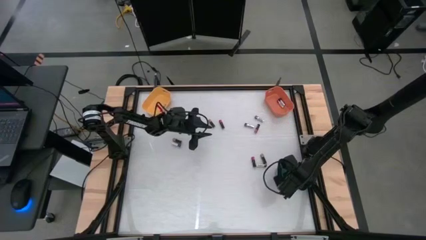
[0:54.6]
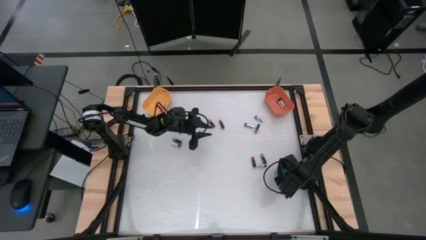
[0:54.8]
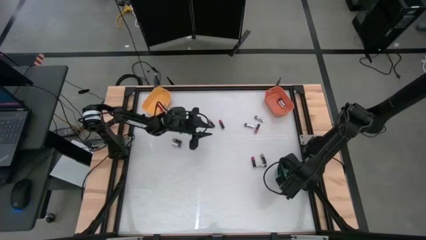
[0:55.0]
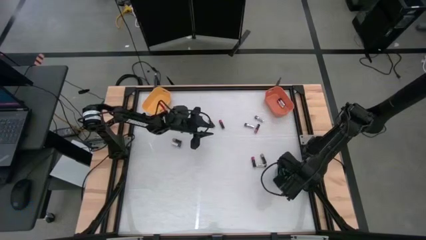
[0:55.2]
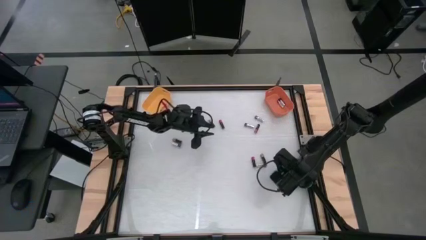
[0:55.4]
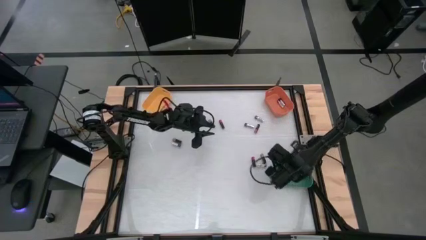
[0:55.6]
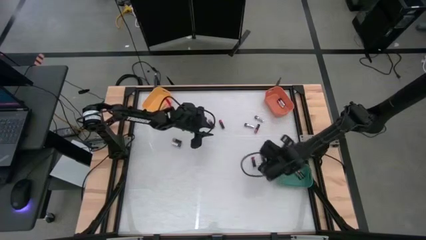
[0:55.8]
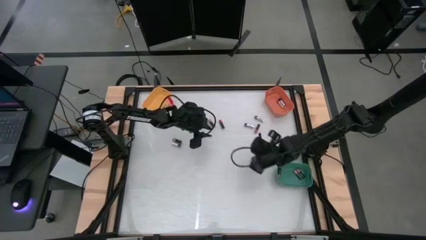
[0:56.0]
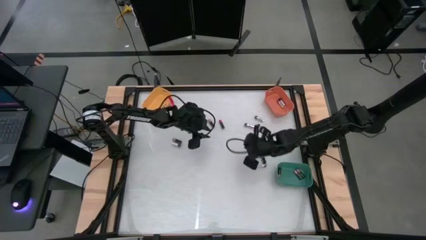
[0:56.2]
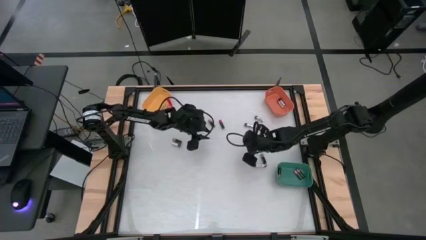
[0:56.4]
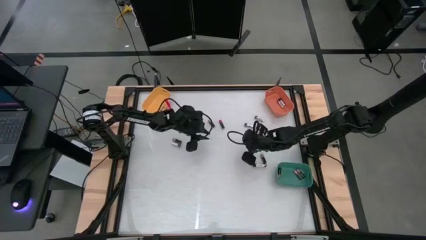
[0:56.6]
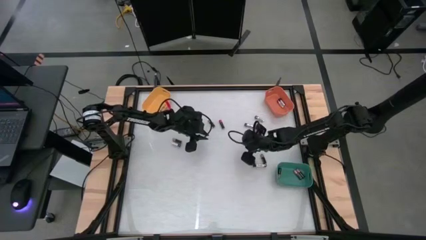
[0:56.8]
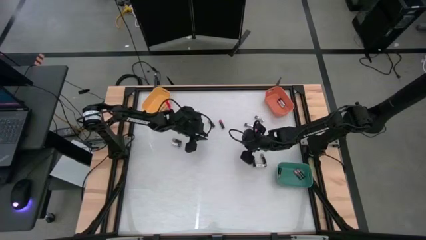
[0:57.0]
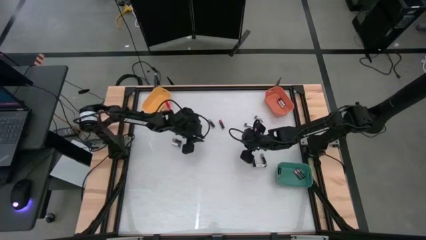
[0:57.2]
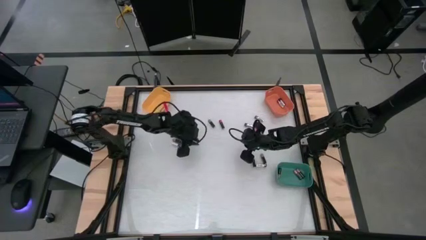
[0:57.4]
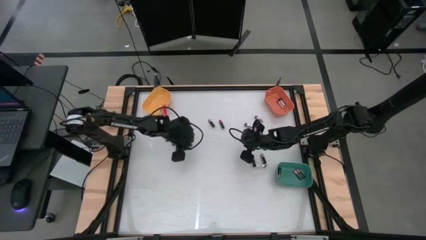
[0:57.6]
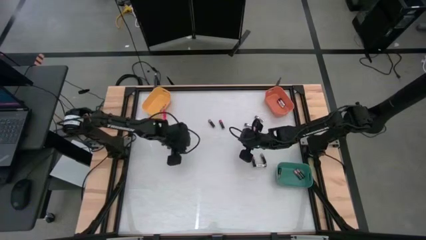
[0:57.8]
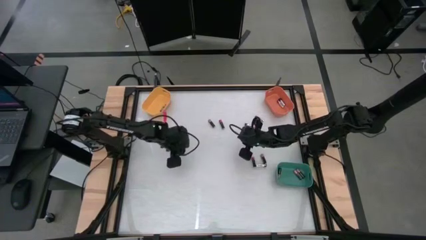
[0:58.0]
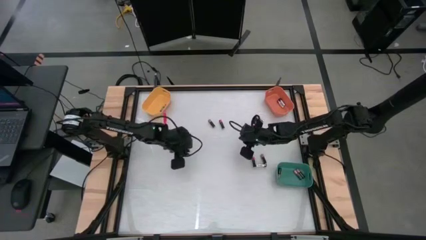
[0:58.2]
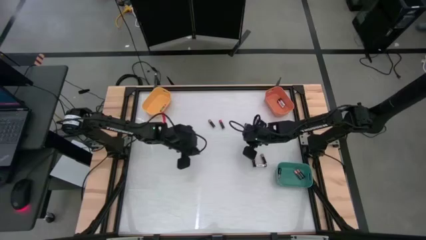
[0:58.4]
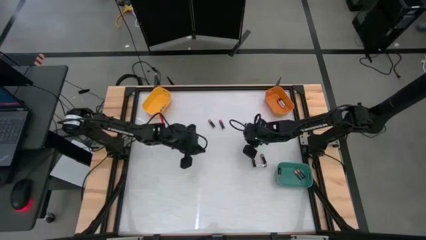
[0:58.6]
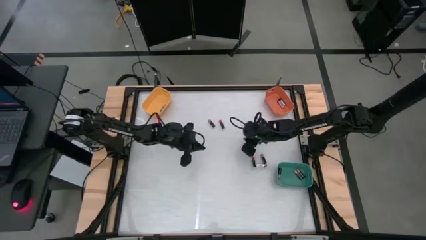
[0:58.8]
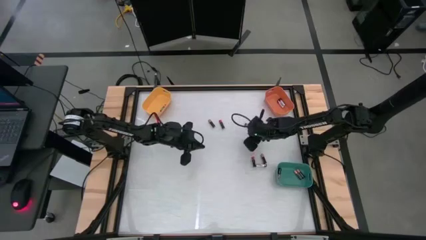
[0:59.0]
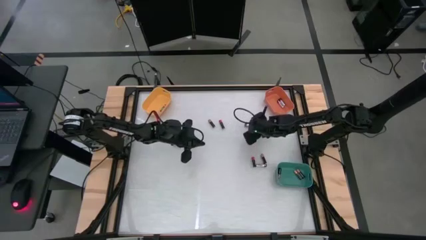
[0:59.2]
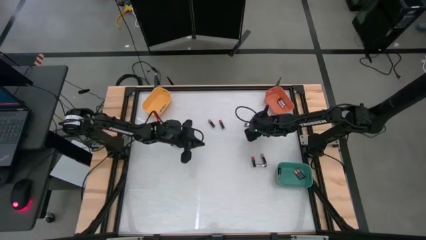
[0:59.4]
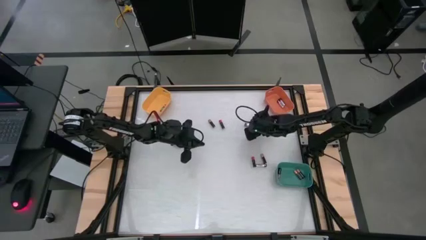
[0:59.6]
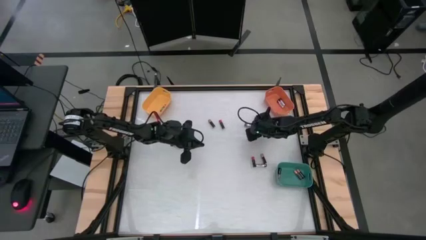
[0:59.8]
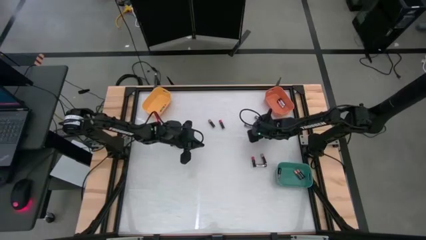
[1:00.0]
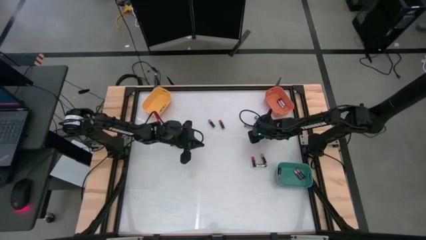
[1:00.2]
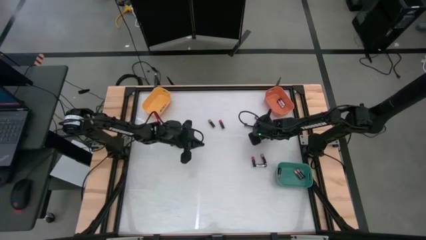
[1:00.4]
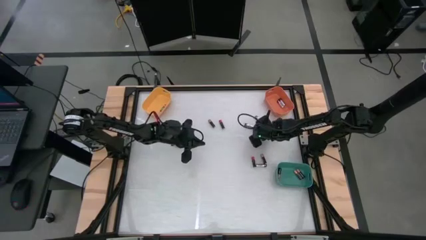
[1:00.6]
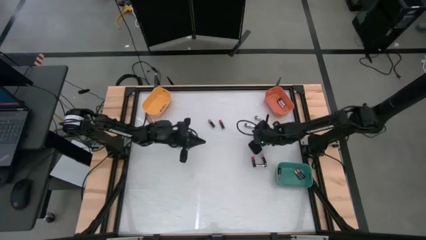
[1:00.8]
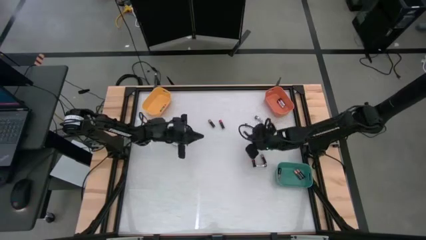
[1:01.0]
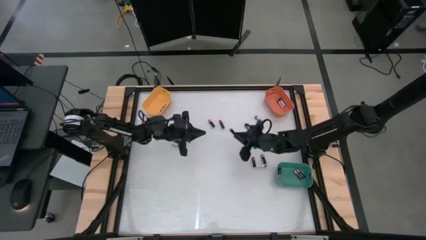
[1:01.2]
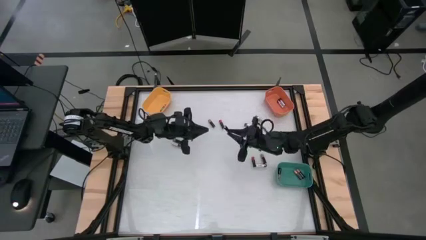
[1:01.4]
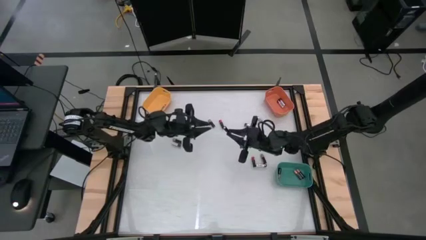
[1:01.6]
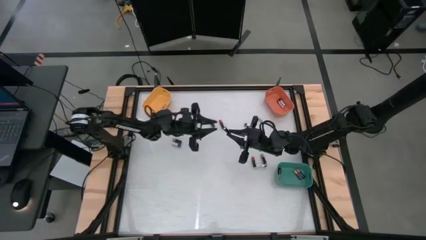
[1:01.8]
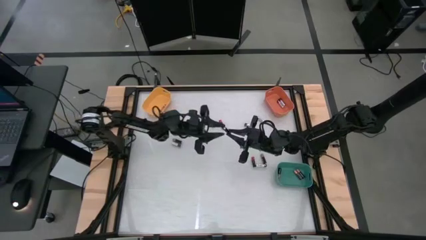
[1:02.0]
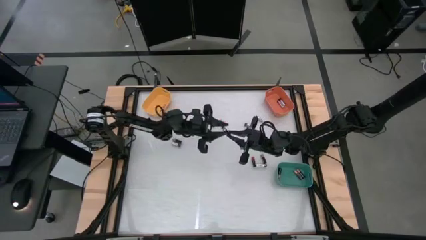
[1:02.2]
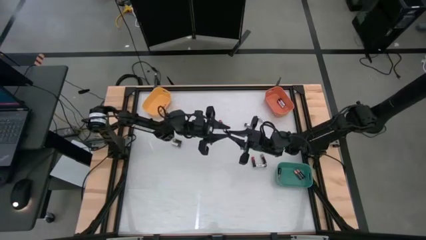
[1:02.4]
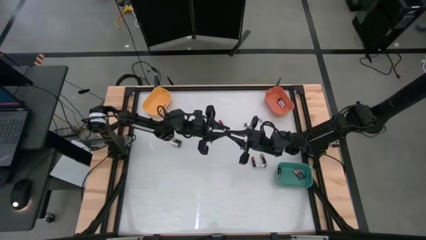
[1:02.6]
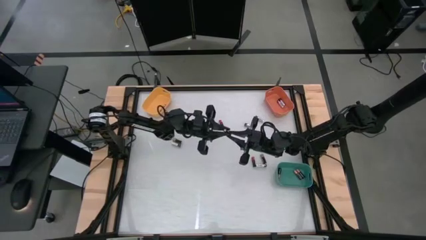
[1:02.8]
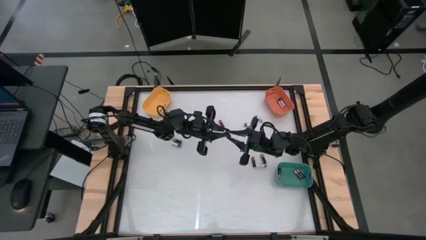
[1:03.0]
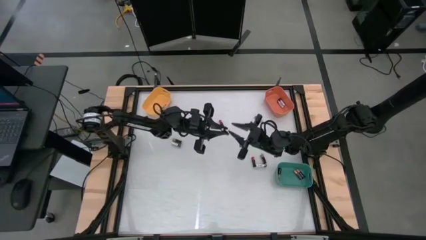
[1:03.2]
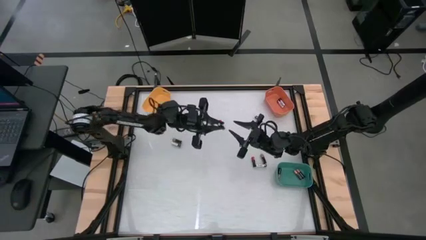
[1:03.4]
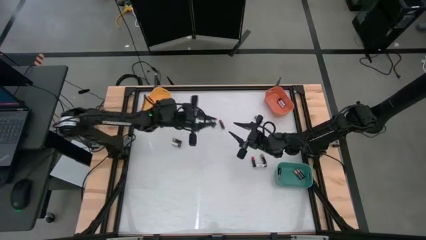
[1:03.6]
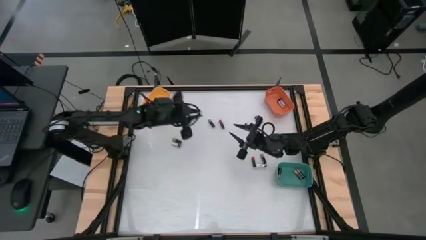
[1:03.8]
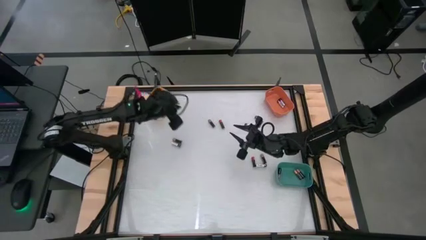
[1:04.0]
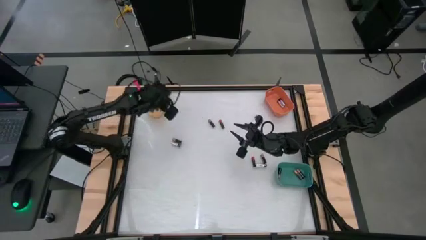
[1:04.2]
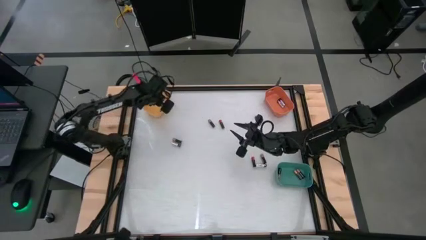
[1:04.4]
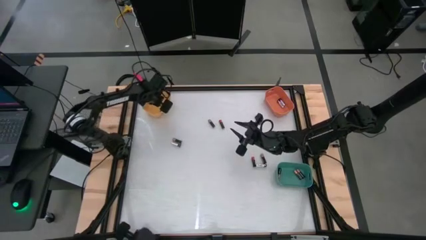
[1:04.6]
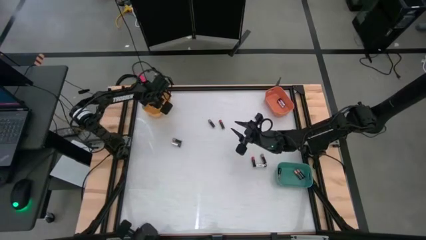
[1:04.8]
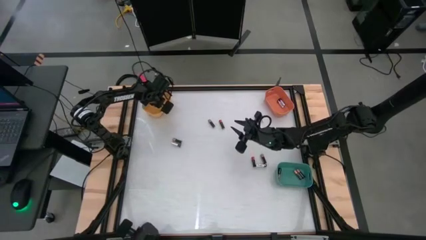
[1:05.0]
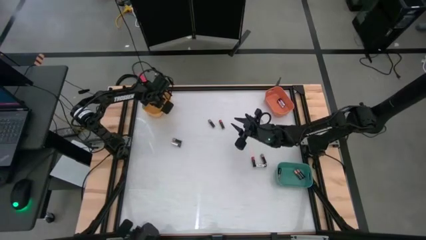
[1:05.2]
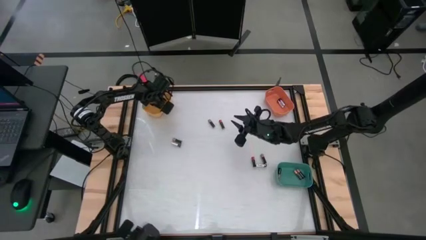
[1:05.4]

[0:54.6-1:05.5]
Task: Sort batteries
Put the red battery into the yellow bin

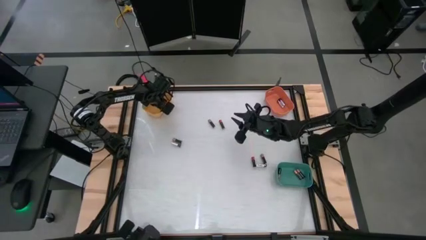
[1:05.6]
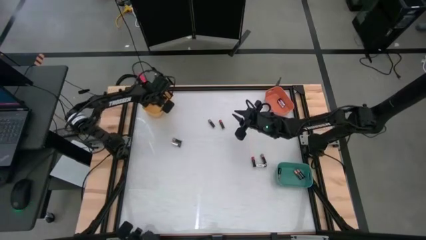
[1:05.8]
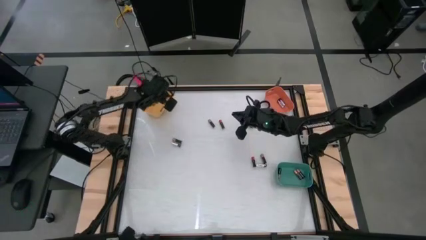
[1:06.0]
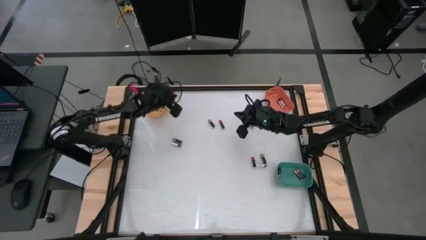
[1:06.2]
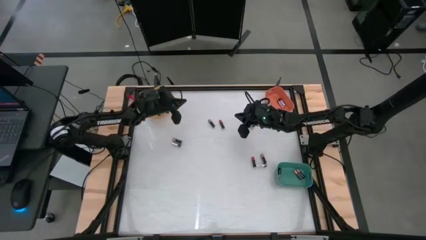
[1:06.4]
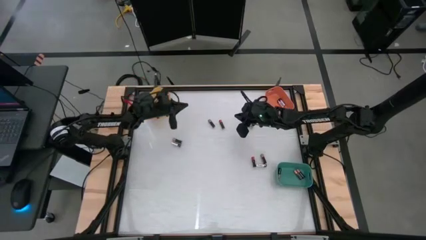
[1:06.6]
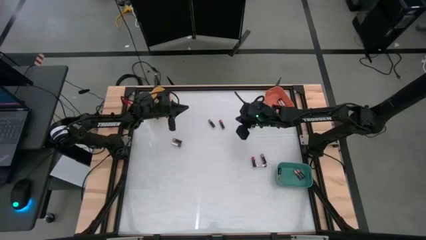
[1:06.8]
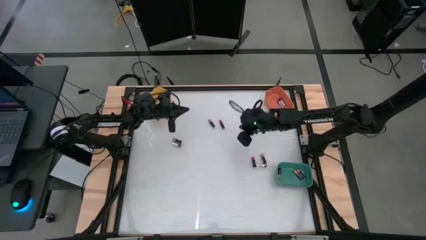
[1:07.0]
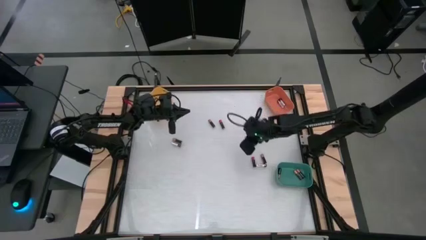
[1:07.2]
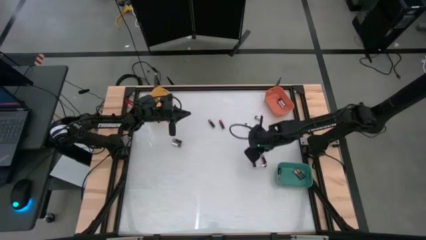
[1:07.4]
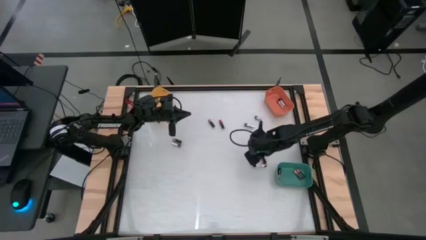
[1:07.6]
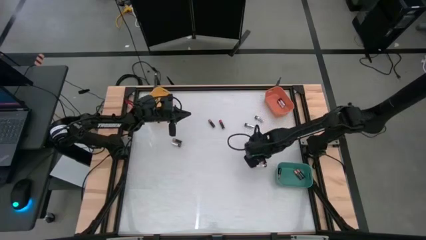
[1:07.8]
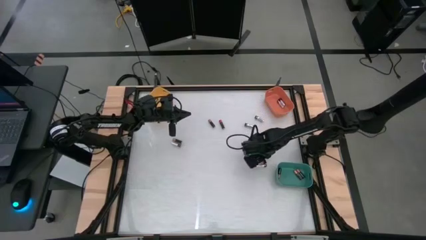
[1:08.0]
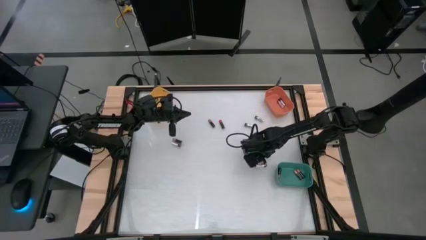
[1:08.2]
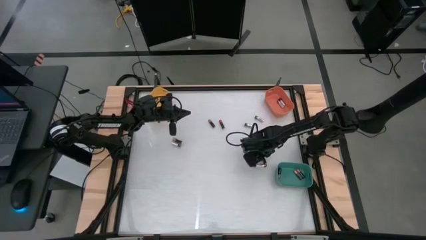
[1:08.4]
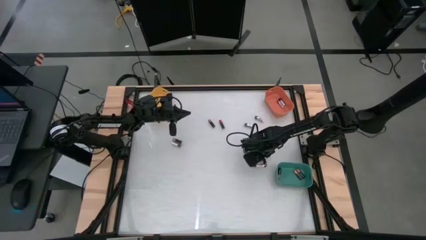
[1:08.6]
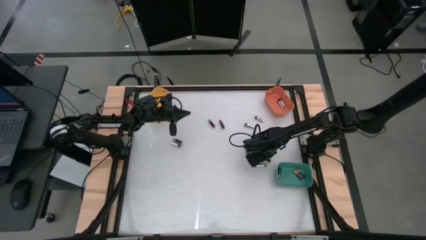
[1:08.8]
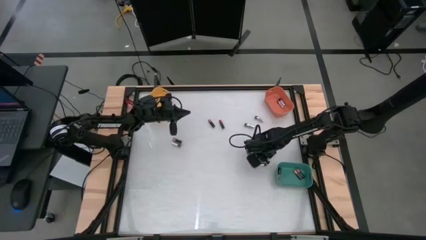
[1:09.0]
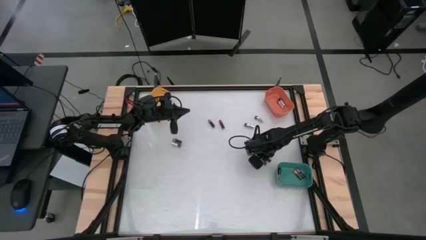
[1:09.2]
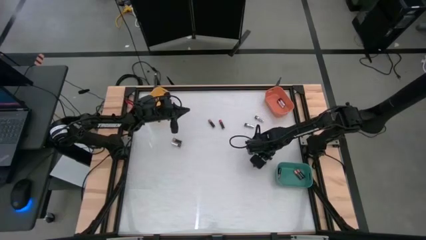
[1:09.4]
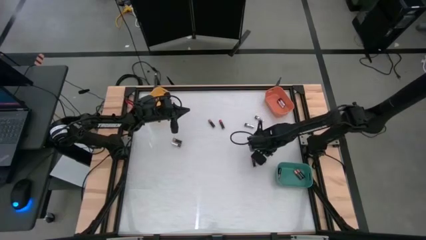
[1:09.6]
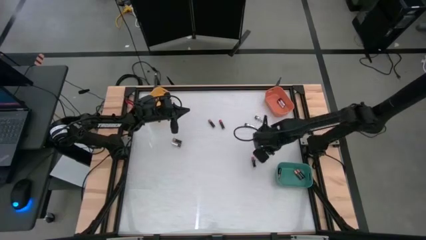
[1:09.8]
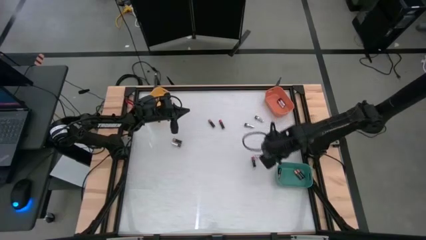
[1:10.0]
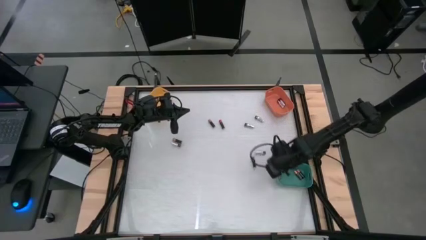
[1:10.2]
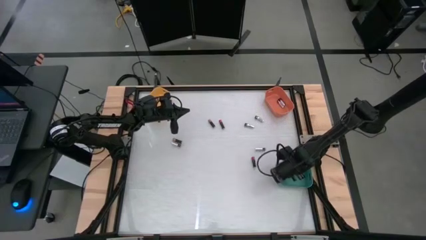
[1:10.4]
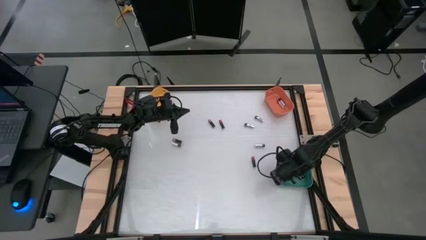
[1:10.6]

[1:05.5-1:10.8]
Put the brown battery into the green bin

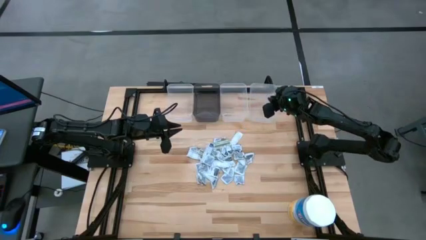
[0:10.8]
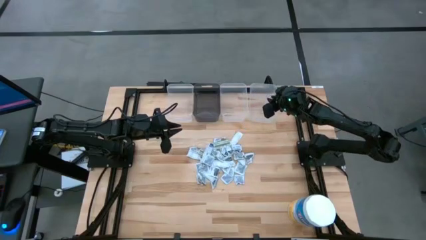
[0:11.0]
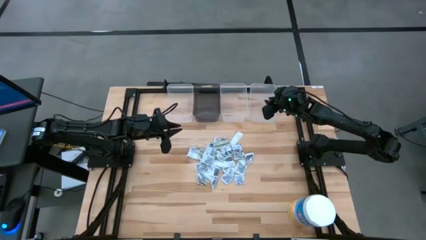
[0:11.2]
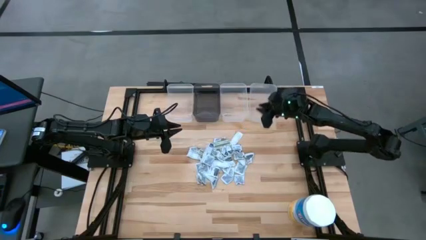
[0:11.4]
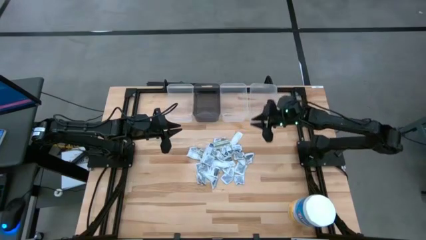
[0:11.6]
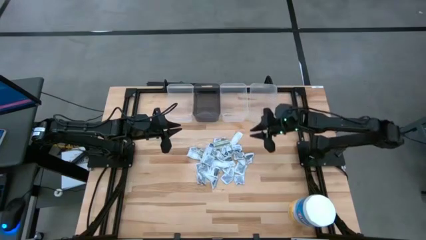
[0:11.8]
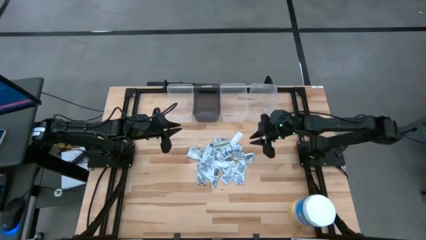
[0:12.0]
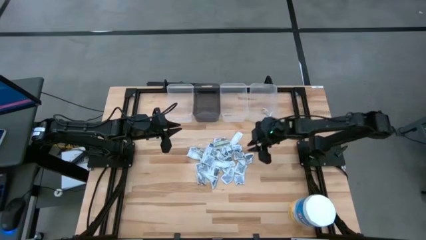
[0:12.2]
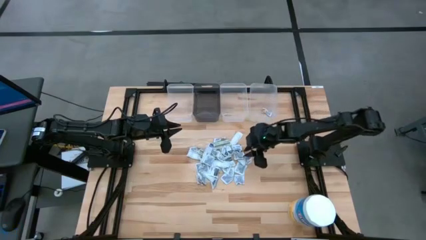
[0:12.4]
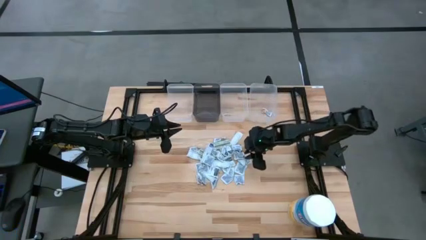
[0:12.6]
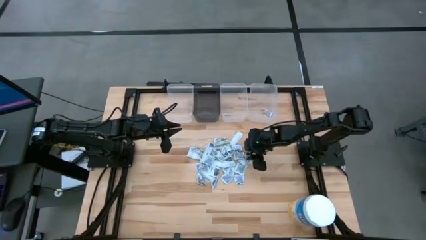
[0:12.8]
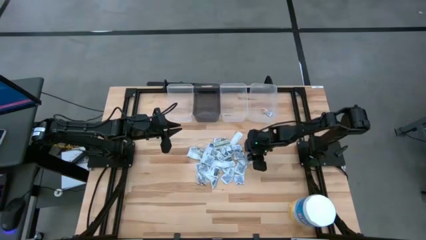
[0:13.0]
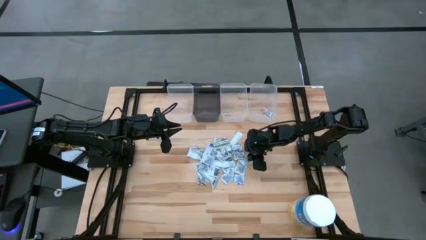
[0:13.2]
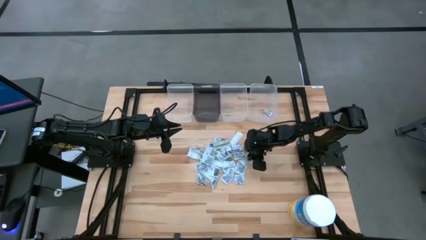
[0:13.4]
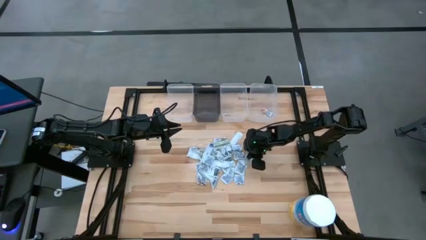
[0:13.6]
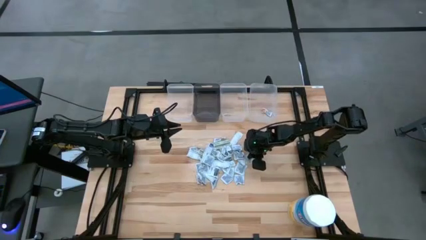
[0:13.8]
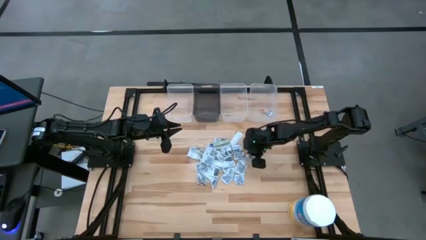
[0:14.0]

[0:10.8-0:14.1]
Task: Pick & Place First Aid Supplies
Put the towelette pack into the middle transparent bin
